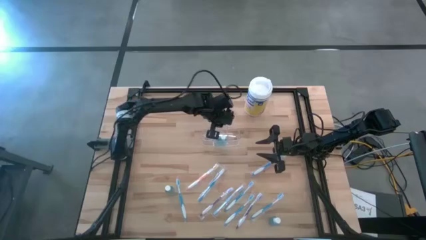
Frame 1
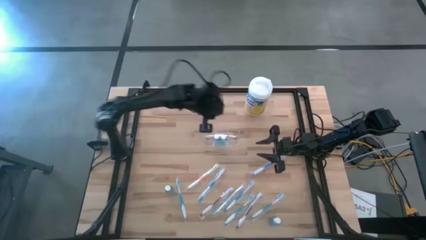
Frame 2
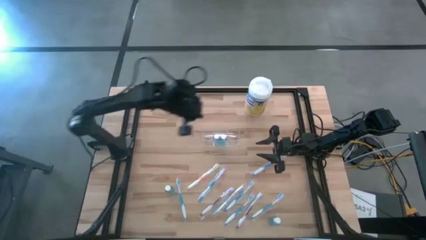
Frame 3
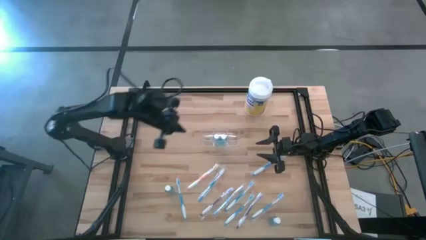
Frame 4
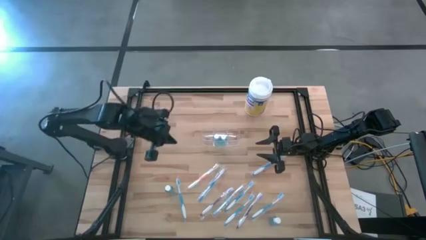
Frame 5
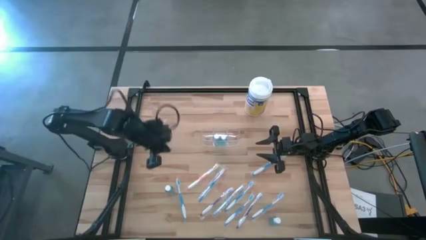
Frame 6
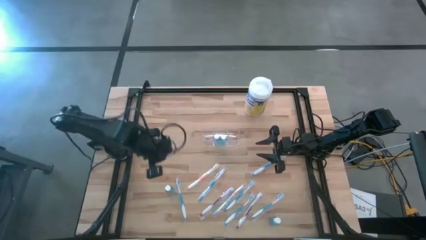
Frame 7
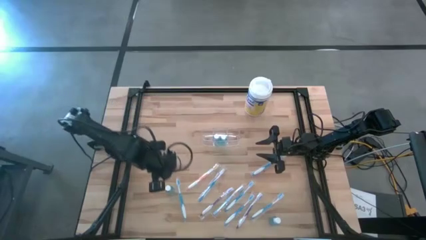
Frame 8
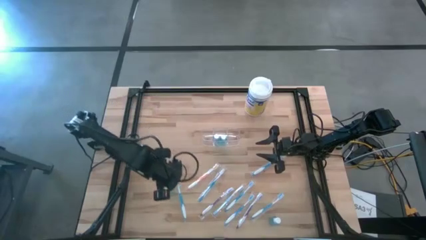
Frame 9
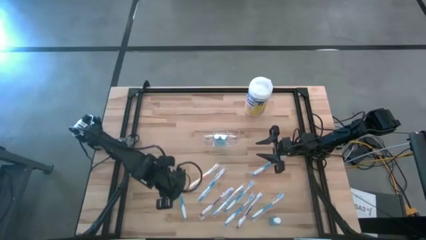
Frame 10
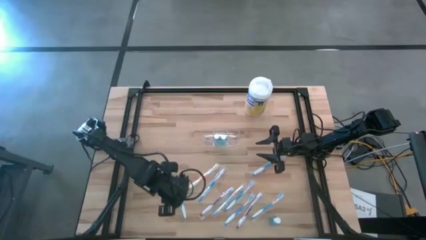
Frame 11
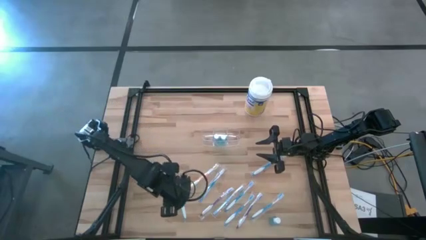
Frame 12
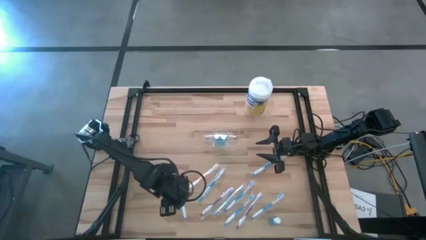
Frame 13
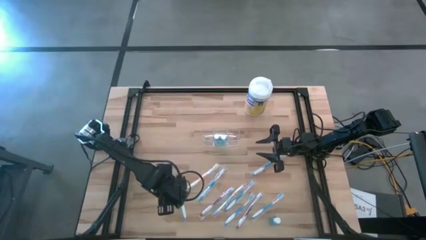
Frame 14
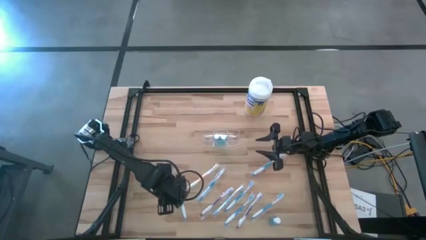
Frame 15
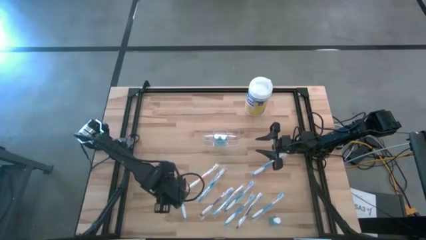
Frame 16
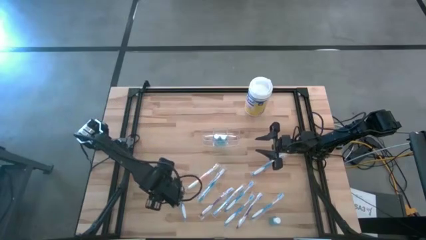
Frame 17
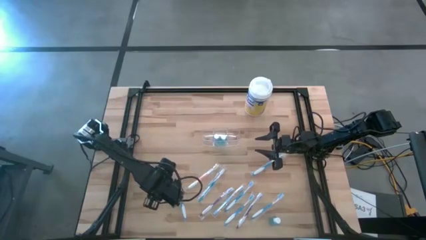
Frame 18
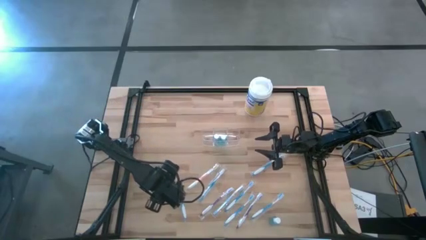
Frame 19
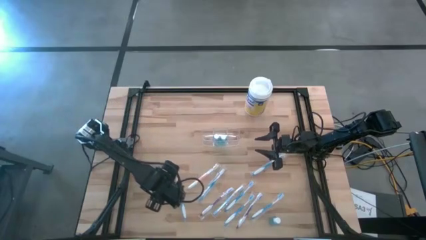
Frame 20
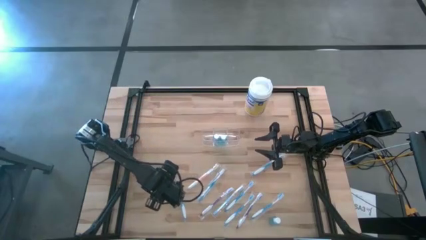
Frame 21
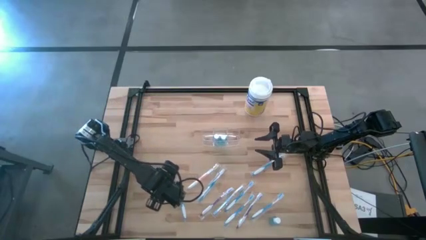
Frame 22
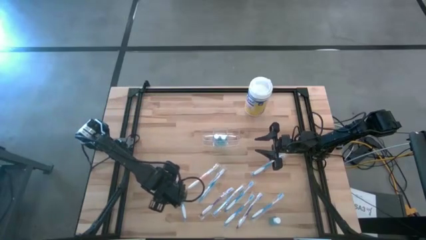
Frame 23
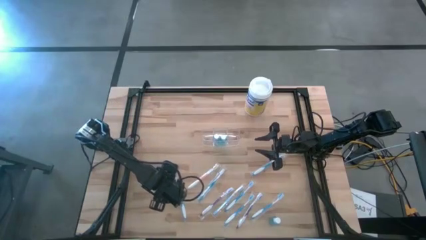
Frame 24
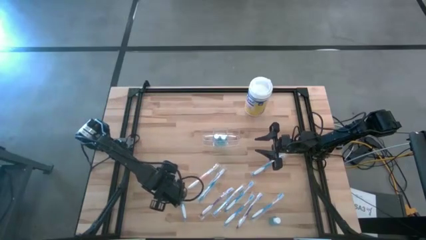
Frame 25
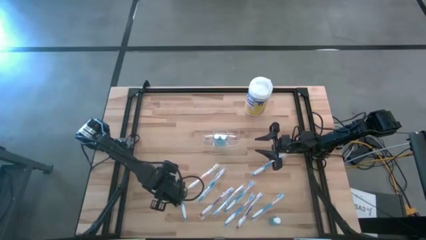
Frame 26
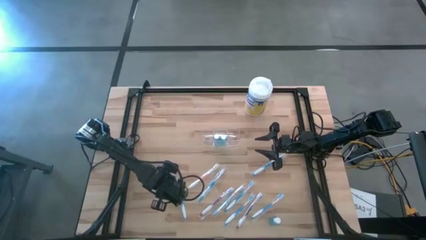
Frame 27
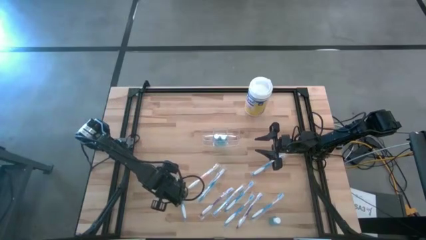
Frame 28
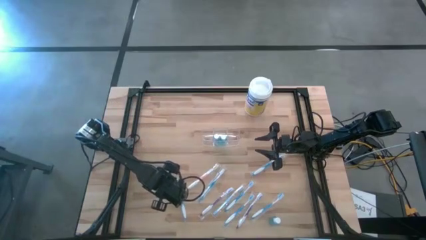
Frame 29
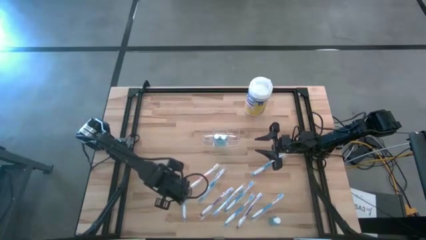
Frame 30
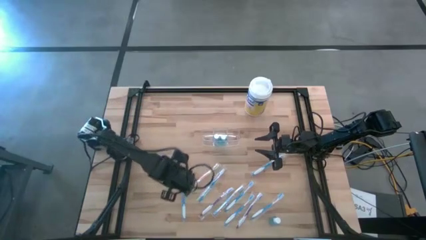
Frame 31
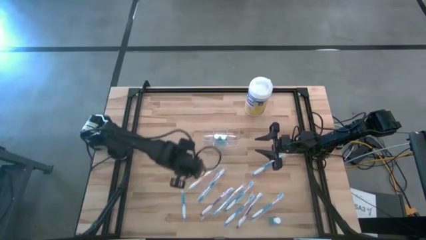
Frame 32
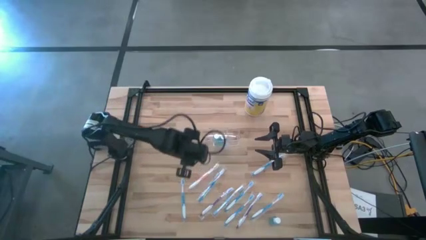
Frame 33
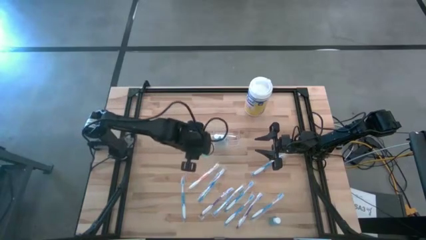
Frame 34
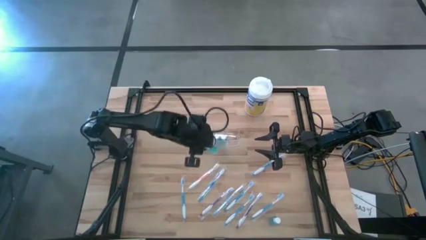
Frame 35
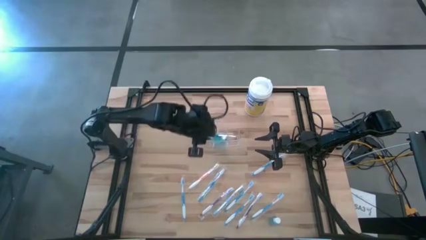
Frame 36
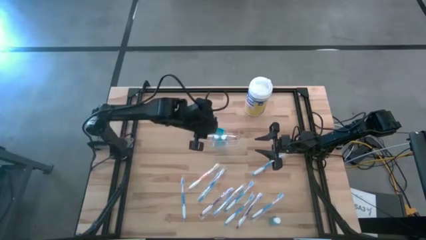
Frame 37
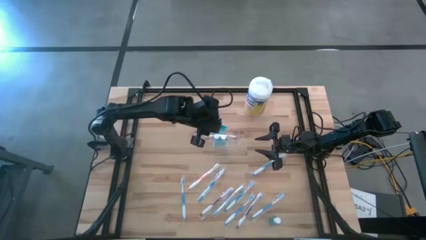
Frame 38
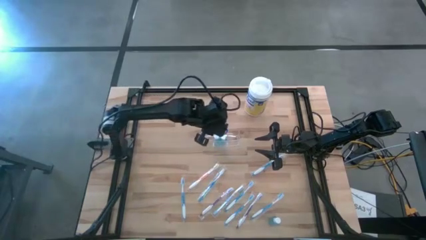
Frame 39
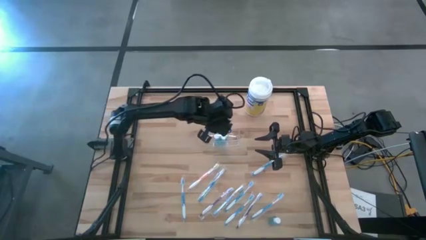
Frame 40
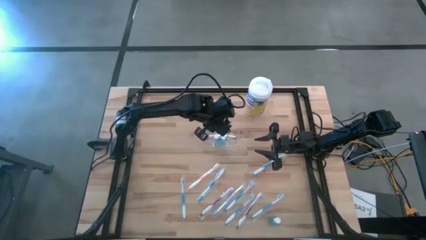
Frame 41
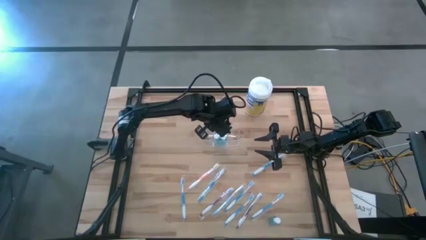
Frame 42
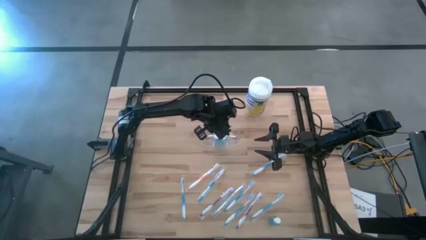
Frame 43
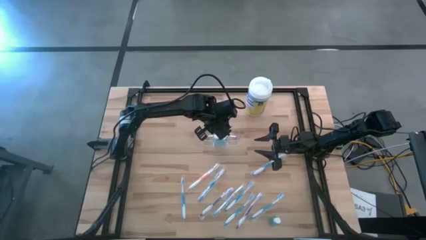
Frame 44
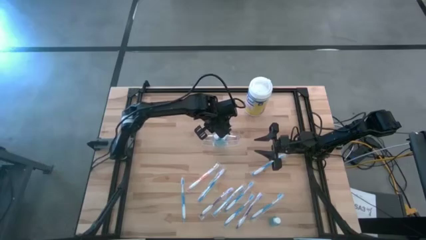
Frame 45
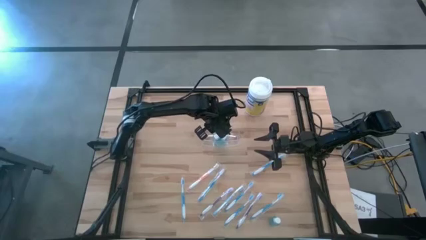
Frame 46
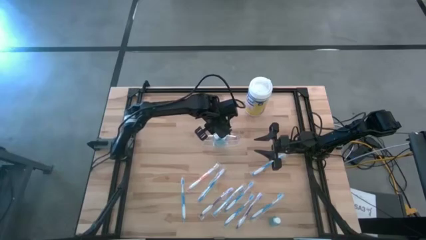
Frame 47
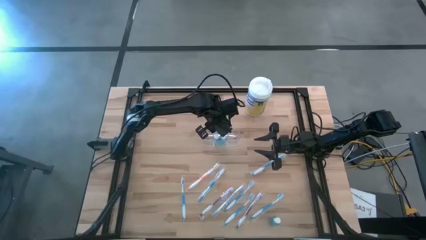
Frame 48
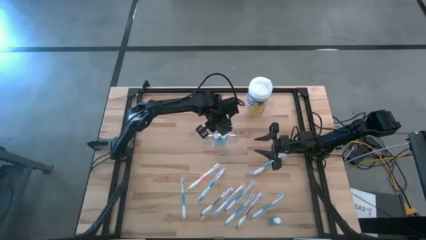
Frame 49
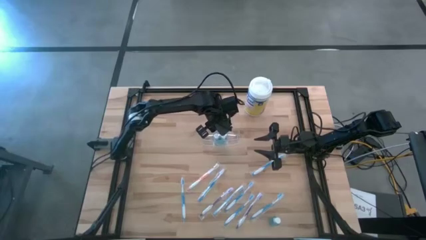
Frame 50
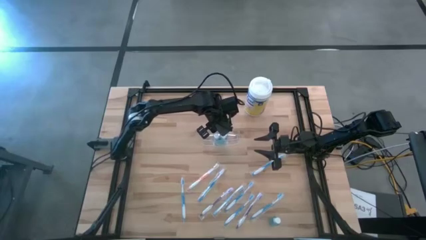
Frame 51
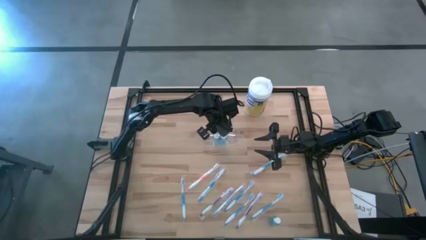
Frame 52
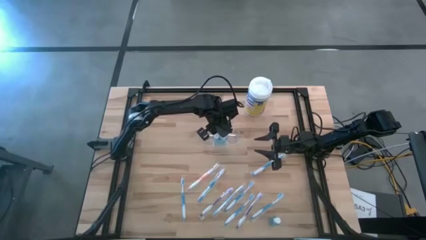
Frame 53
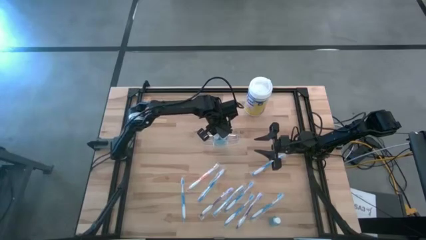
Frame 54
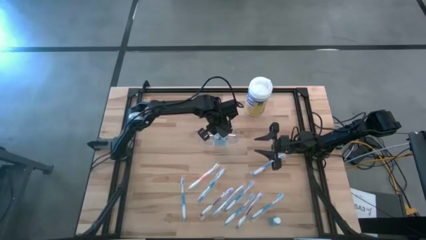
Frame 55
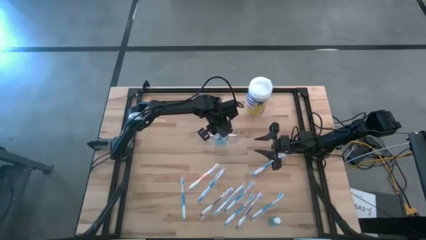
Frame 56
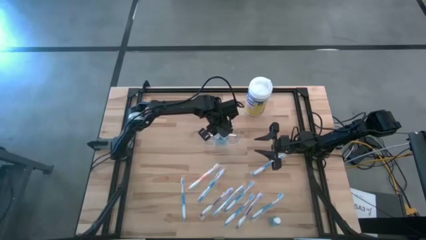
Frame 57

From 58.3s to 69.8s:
Task: Pick & Place toothbrushing station
Put the blue mouthwash into the transparent organizer
